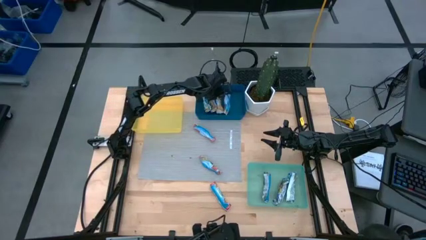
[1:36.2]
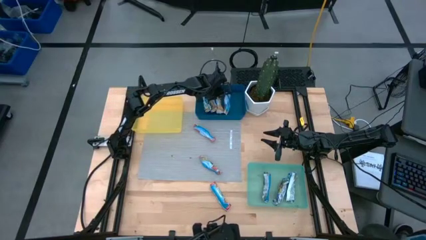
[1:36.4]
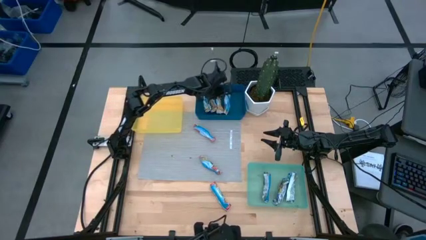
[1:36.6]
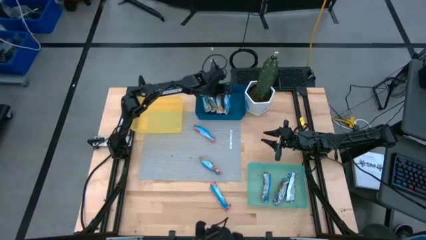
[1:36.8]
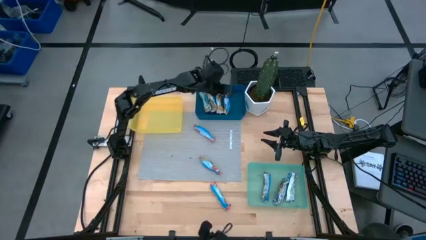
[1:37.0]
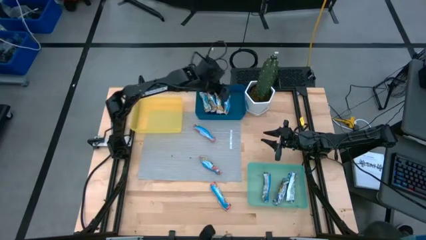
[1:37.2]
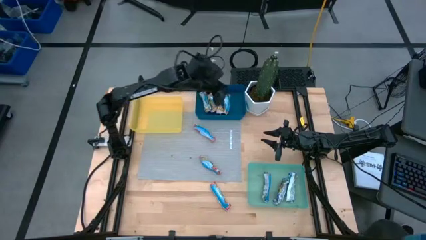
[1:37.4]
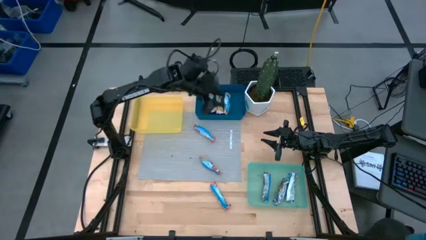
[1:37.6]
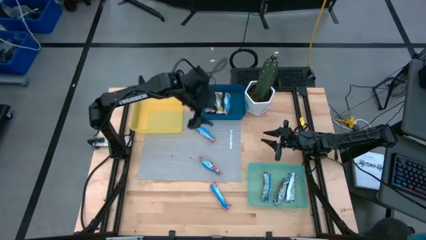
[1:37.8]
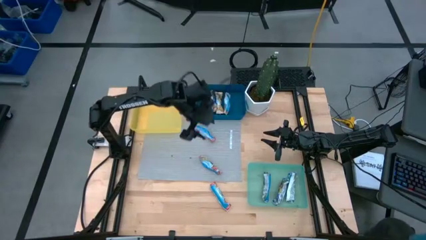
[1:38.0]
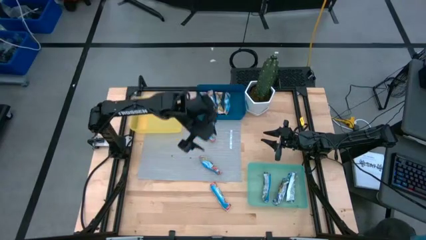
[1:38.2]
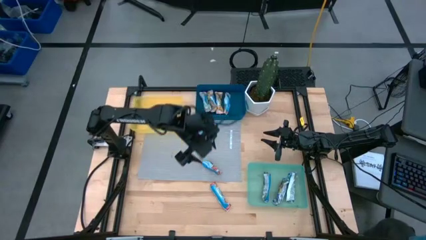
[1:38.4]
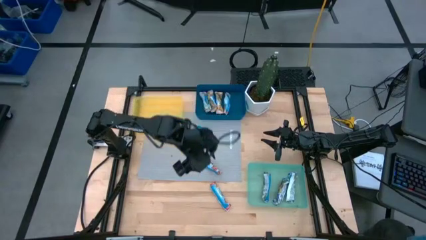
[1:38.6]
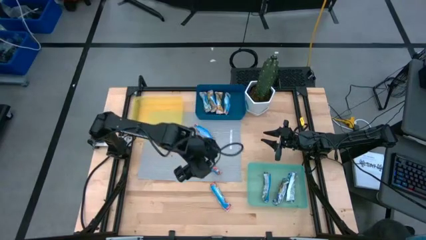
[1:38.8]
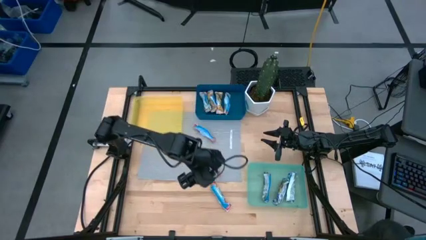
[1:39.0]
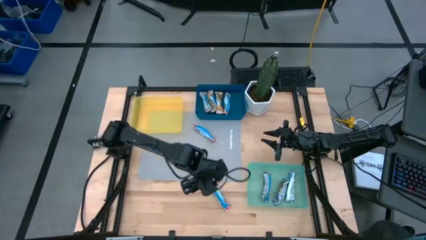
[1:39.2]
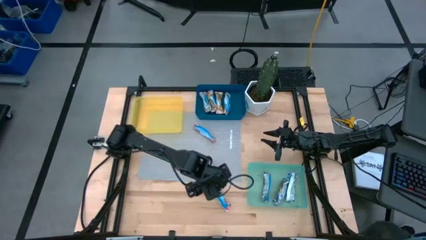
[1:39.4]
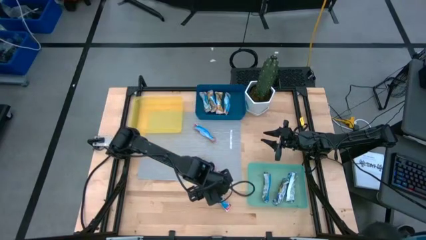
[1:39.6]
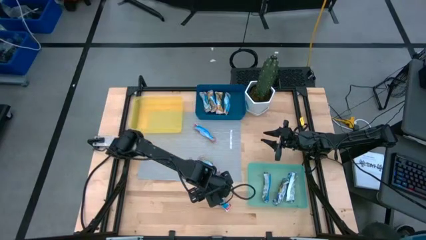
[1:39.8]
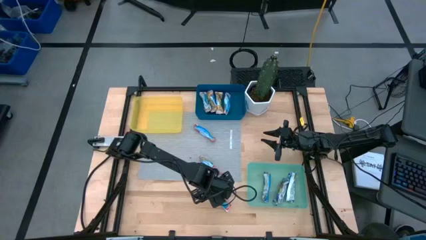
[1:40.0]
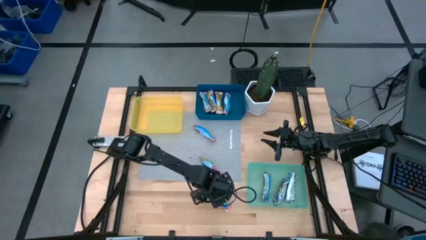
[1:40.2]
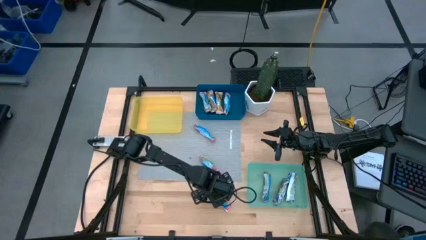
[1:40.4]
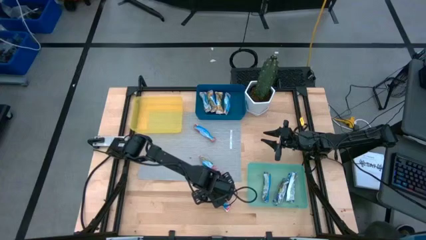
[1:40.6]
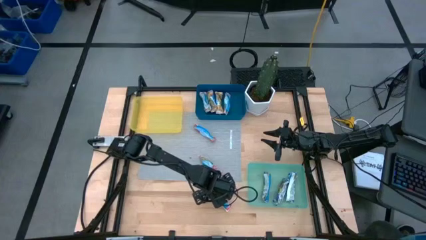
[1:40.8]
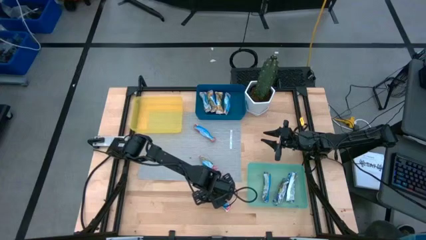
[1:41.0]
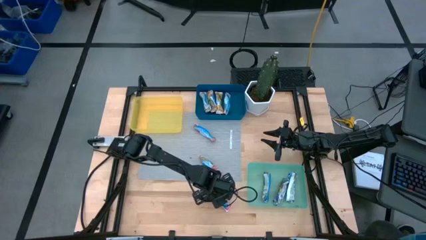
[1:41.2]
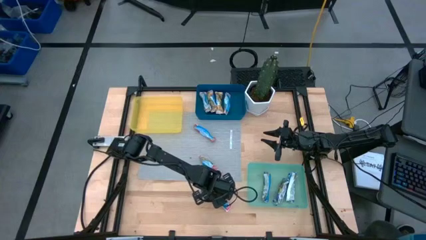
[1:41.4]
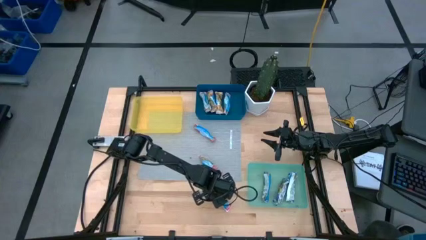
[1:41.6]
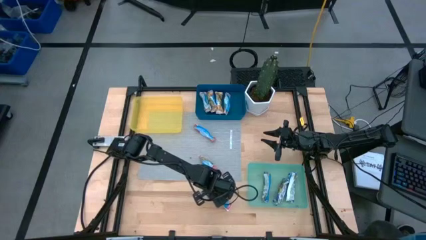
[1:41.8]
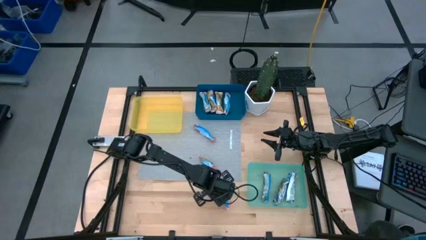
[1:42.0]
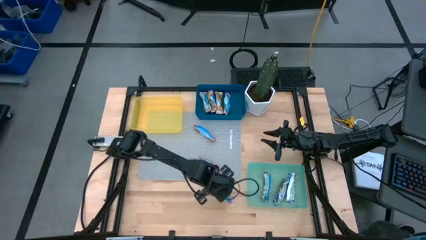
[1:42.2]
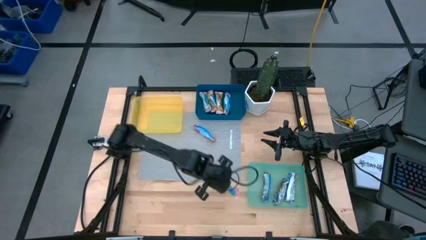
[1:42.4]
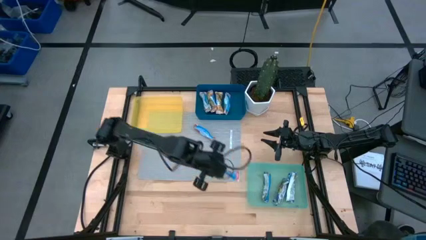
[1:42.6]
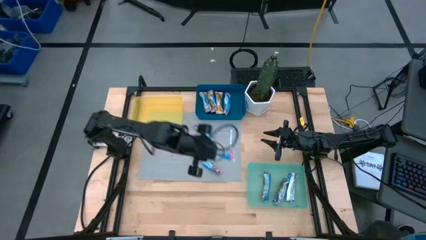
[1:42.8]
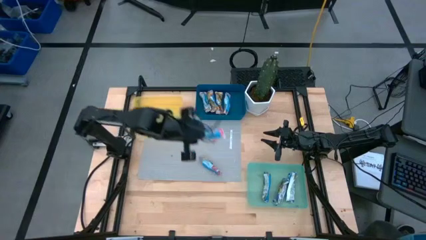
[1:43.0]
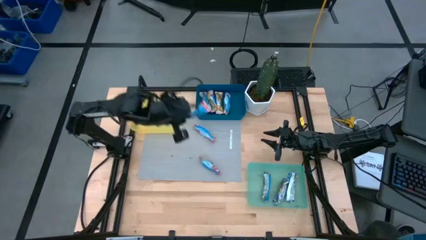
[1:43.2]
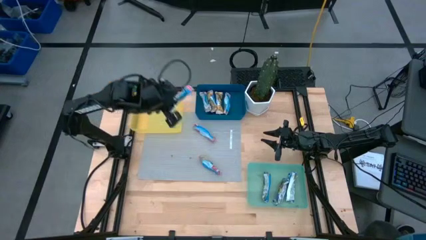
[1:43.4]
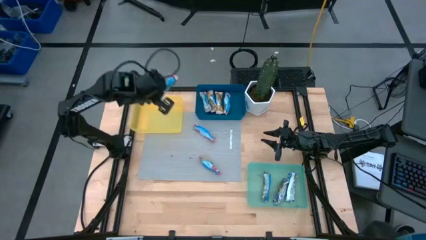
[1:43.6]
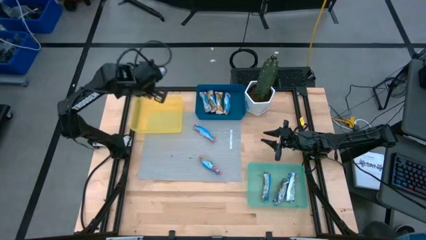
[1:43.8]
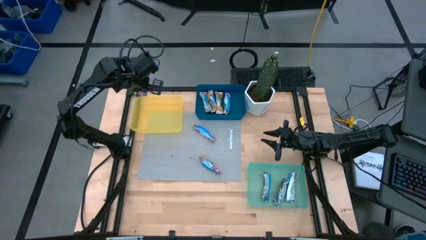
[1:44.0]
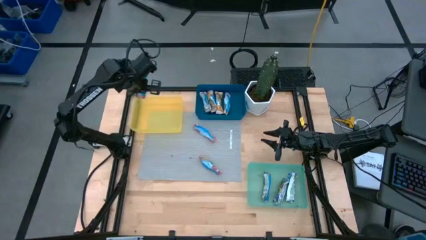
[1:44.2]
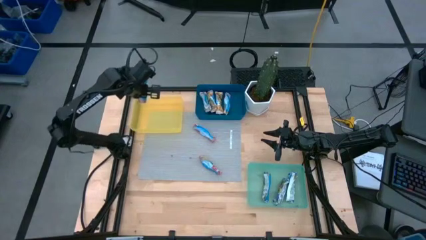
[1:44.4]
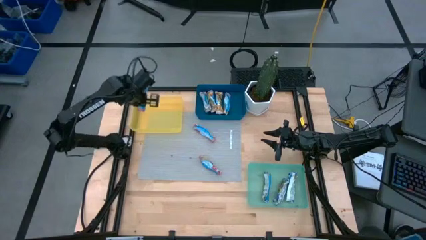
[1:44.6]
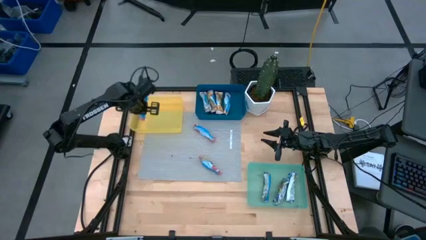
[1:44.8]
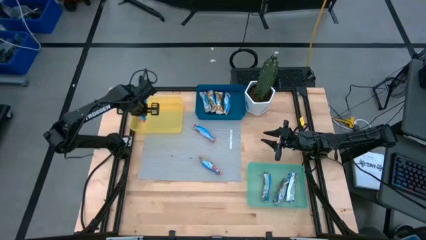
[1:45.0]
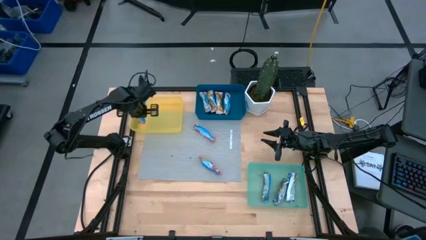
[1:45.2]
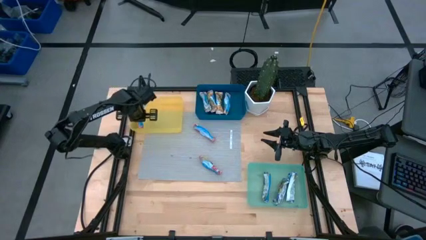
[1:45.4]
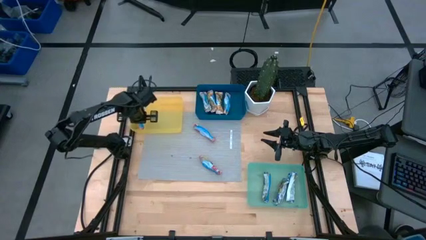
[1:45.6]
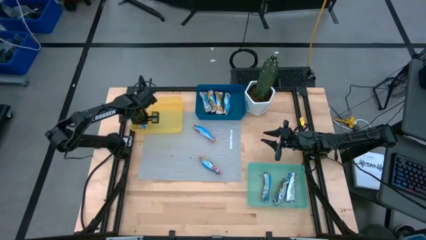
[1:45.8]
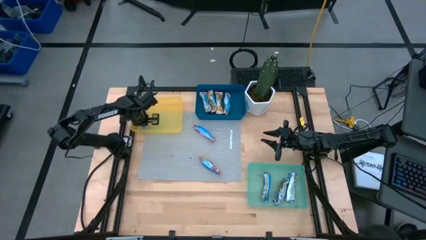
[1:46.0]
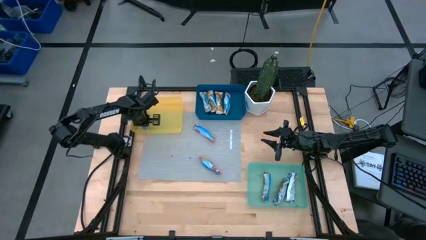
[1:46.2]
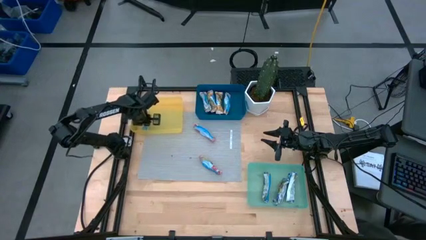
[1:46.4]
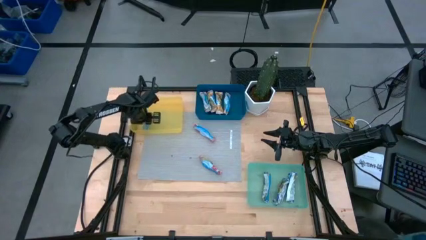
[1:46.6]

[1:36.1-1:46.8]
Task: Pick and place Granola Bars by type
Put the red granola bar into the yellow bin

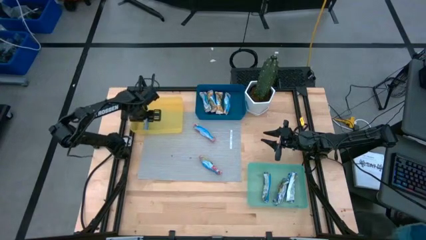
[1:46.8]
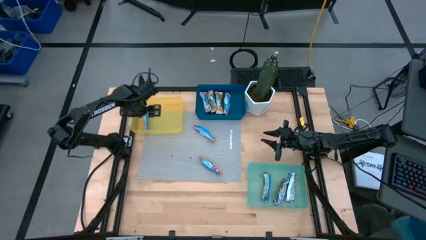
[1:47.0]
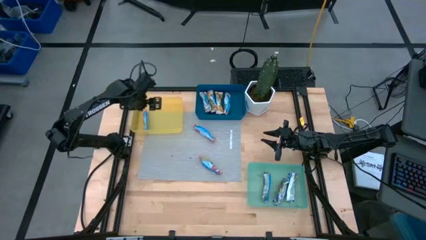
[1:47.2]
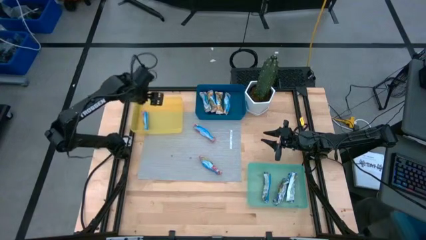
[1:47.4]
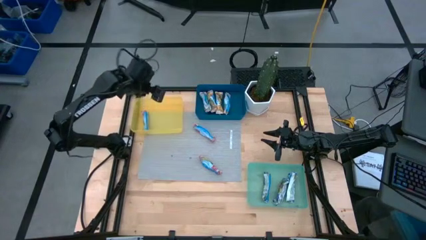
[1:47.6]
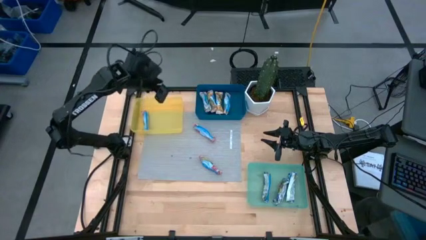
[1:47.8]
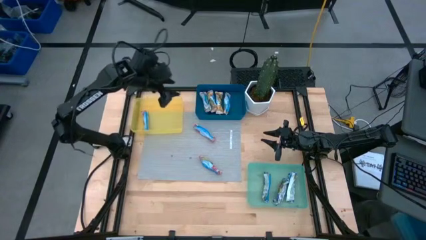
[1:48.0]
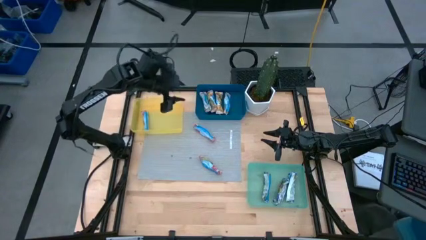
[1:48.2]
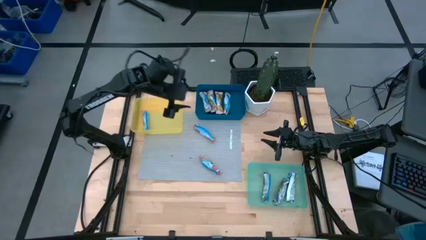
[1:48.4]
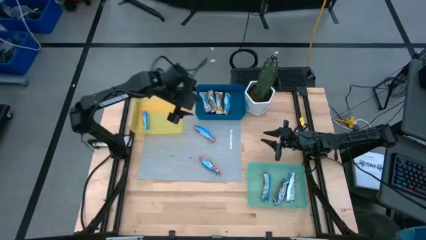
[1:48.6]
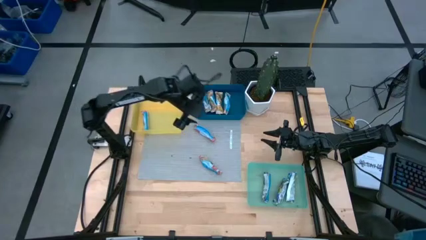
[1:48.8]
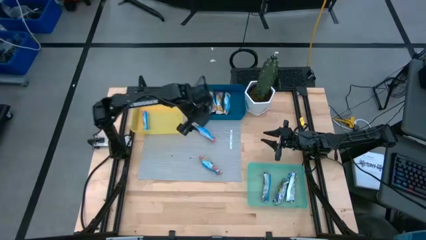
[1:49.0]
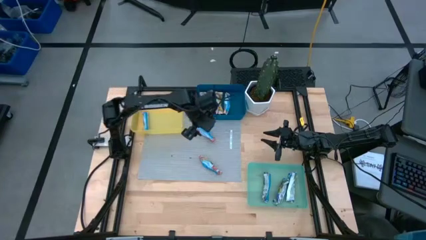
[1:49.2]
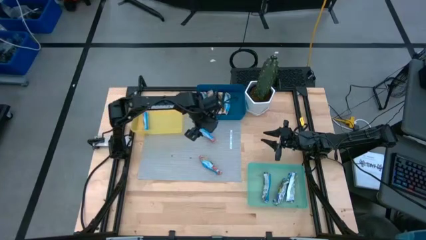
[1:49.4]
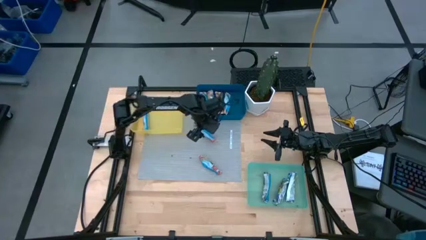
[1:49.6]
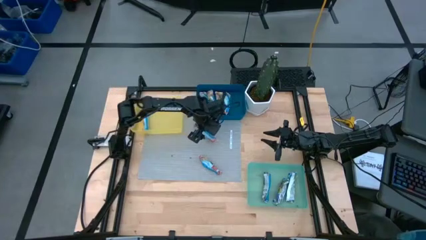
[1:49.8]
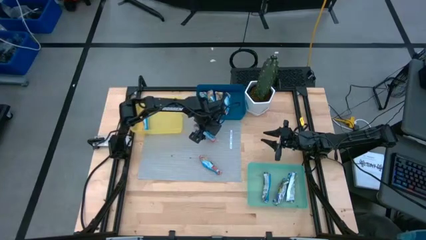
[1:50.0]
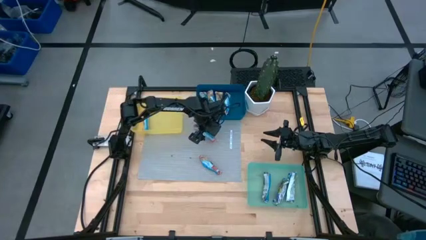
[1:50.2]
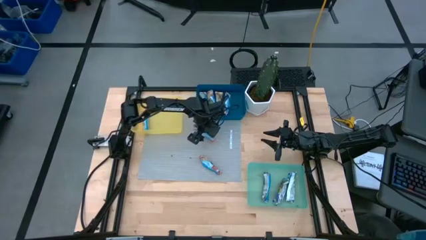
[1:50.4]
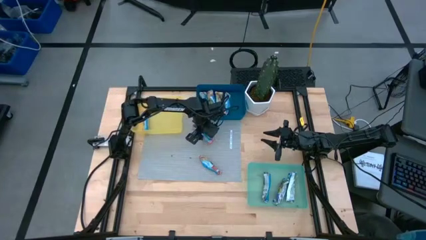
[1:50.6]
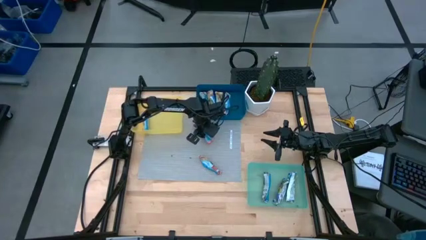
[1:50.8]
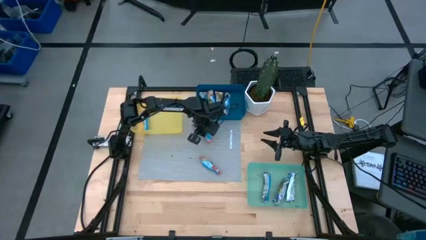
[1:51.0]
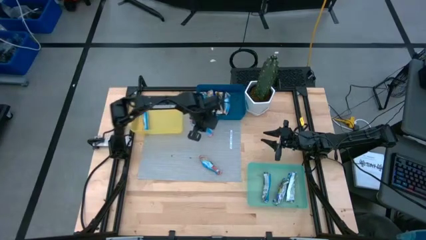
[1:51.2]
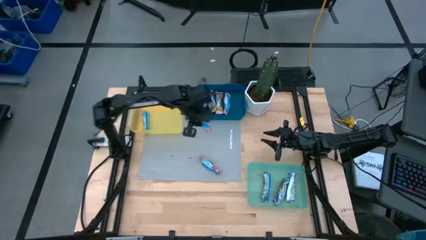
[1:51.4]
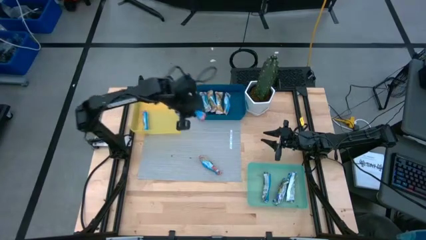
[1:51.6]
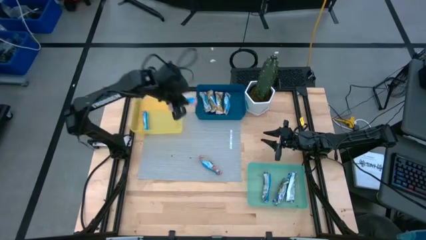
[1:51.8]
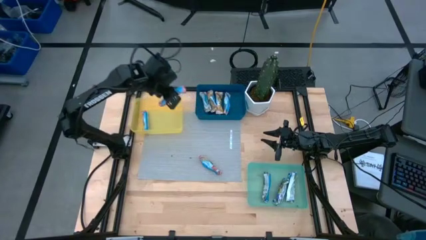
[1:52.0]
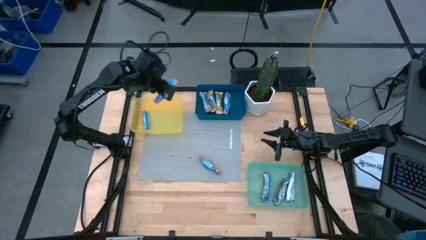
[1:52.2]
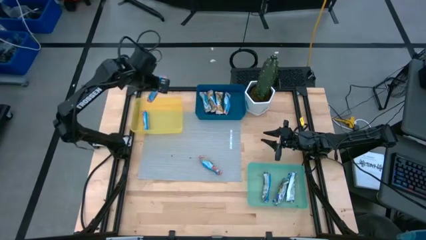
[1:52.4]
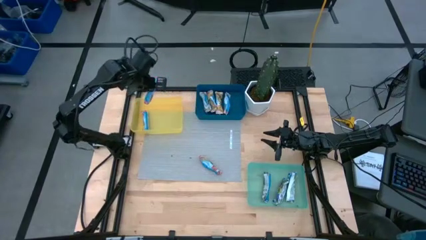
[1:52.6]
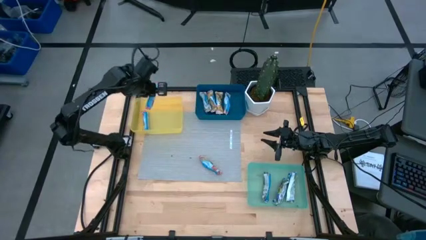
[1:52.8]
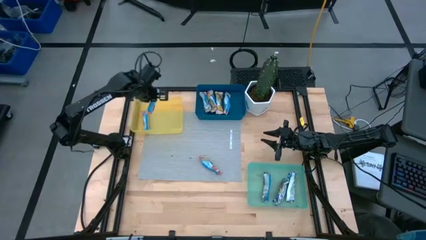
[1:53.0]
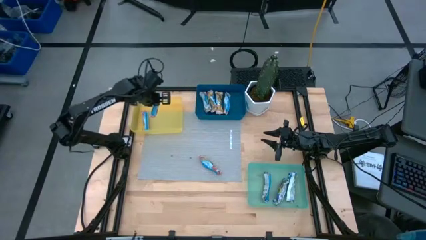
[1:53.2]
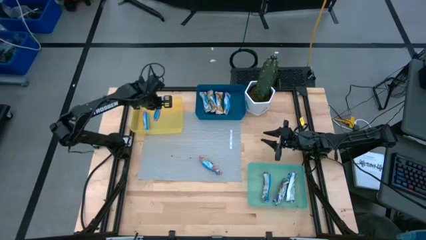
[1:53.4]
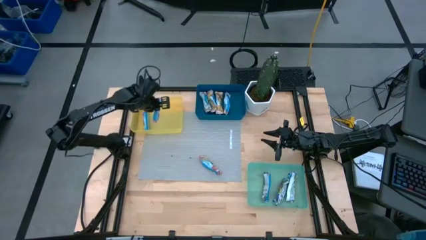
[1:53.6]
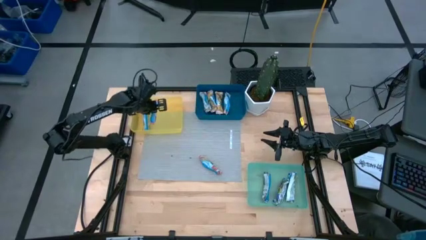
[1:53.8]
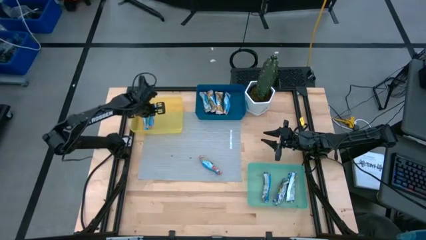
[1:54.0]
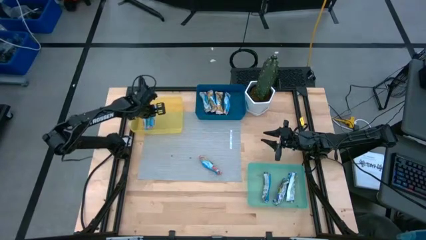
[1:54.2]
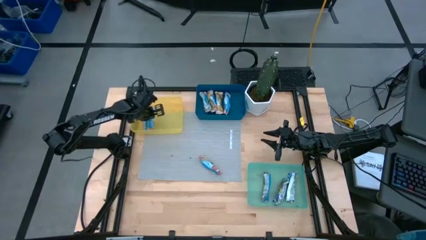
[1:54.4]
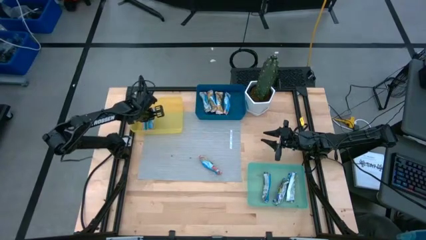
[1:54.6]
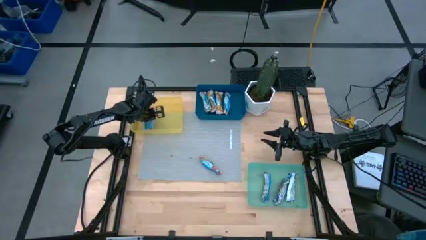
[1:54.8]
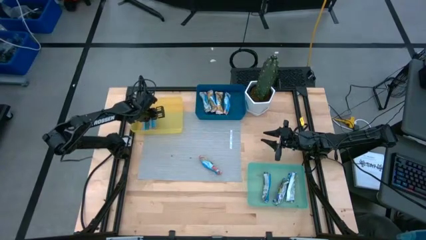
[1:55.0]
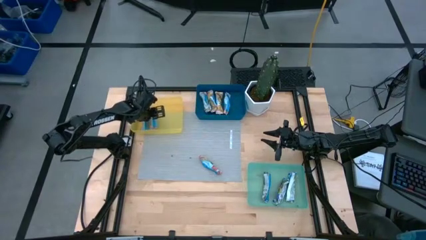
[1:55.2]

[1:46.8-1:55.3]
Put the red granola bar into the yellow bin
